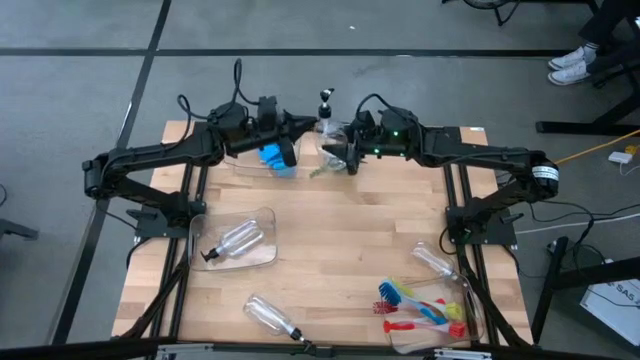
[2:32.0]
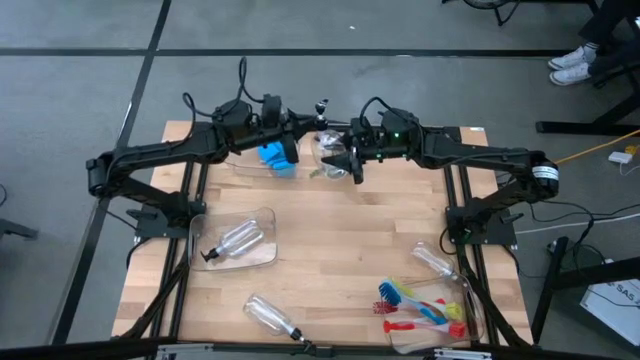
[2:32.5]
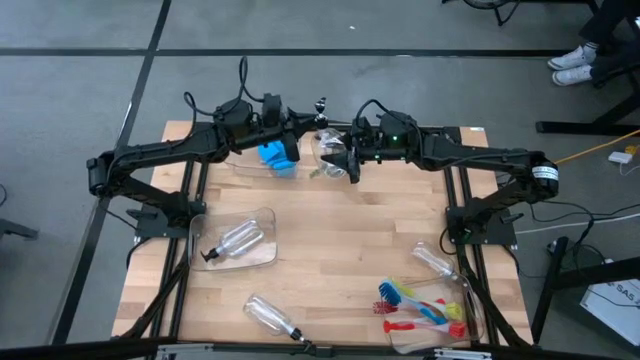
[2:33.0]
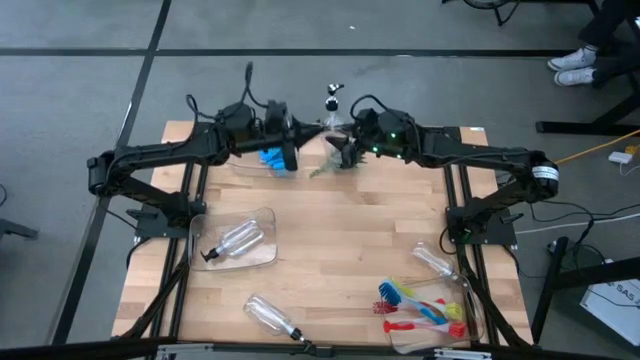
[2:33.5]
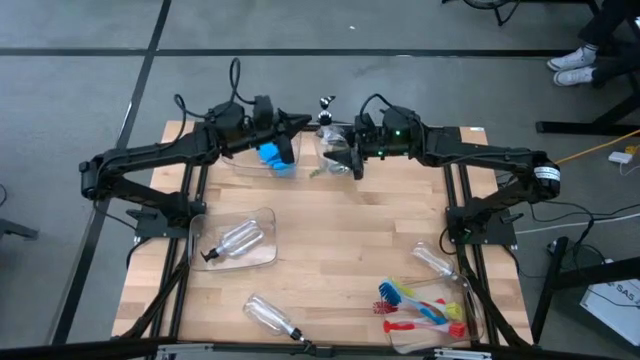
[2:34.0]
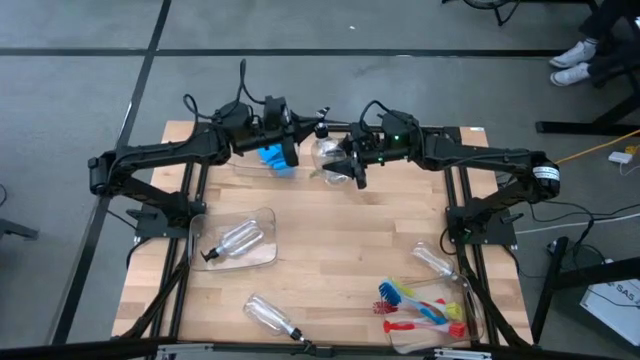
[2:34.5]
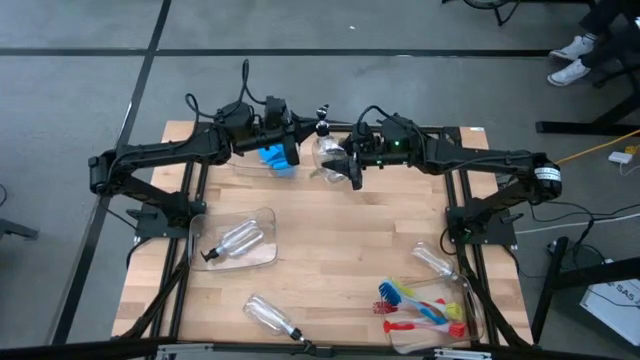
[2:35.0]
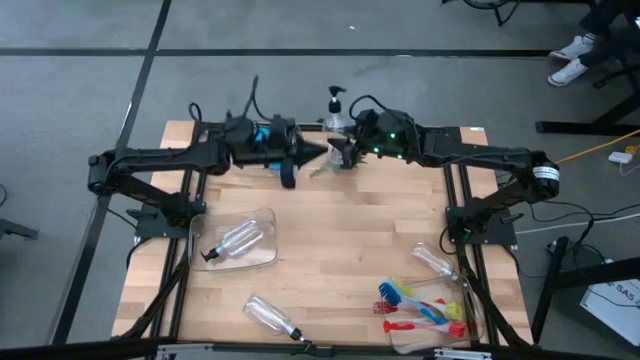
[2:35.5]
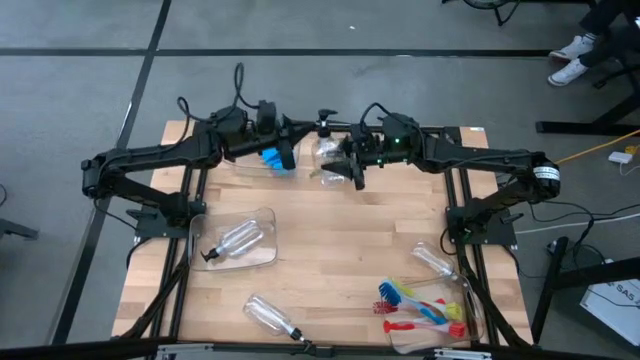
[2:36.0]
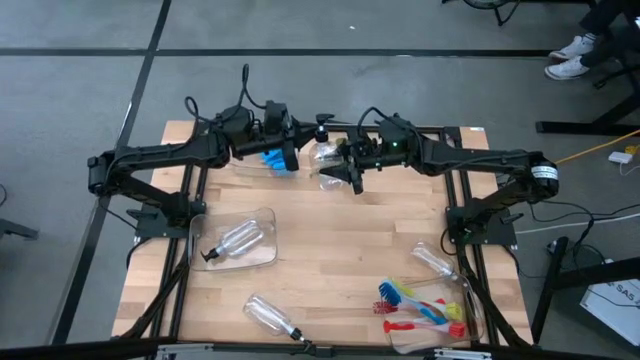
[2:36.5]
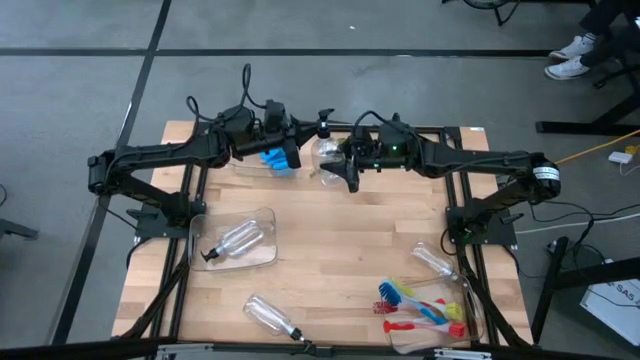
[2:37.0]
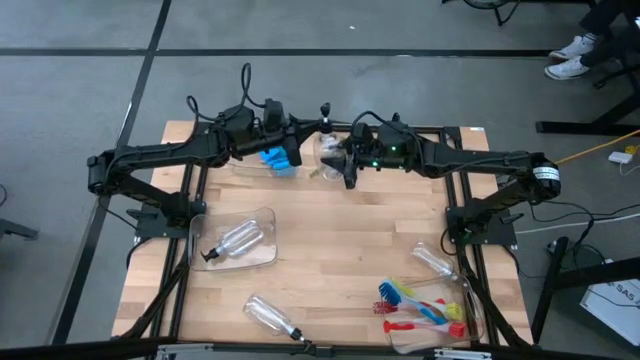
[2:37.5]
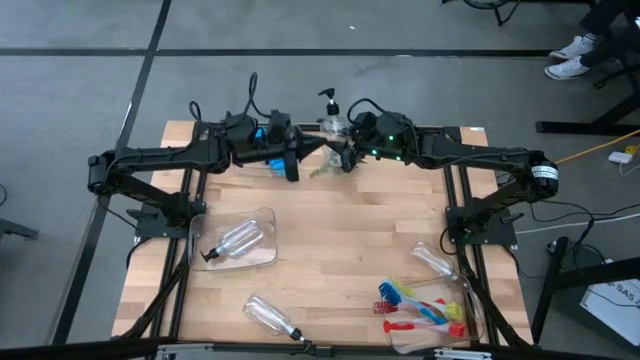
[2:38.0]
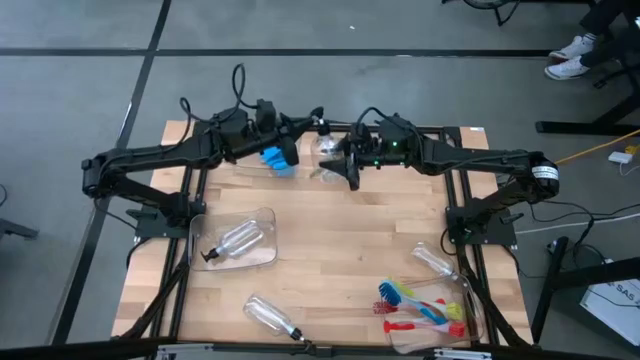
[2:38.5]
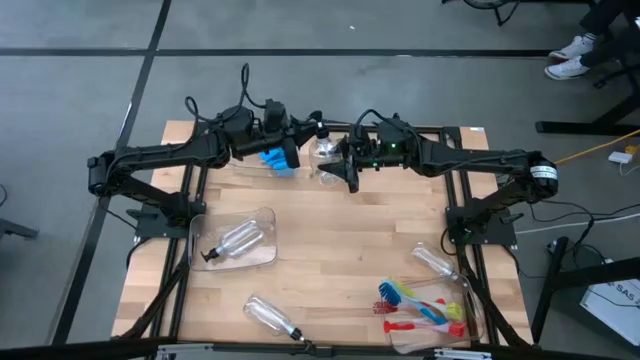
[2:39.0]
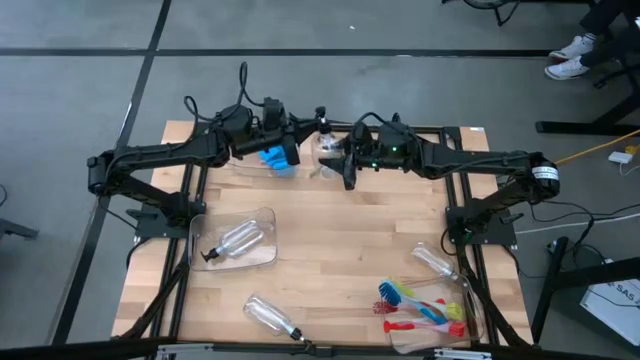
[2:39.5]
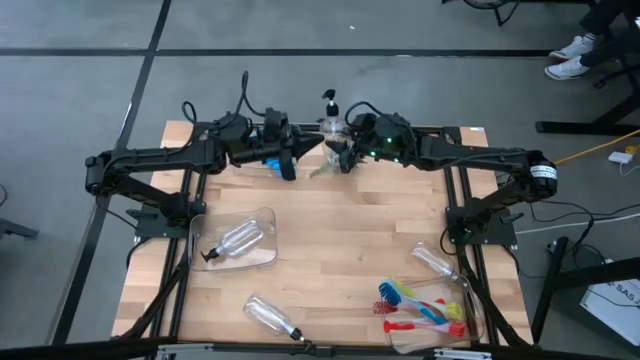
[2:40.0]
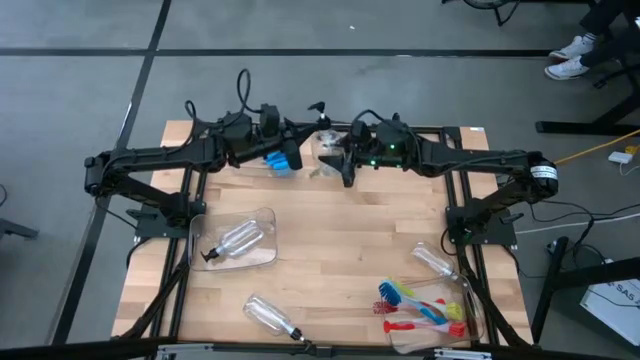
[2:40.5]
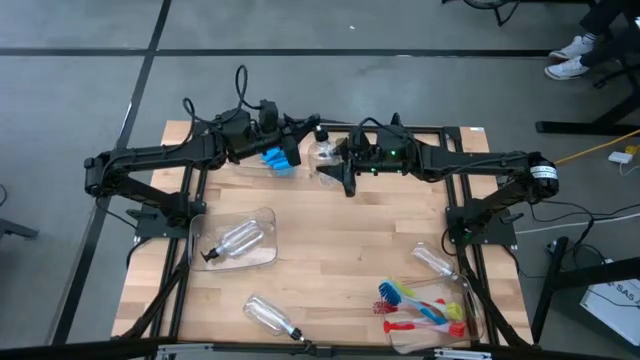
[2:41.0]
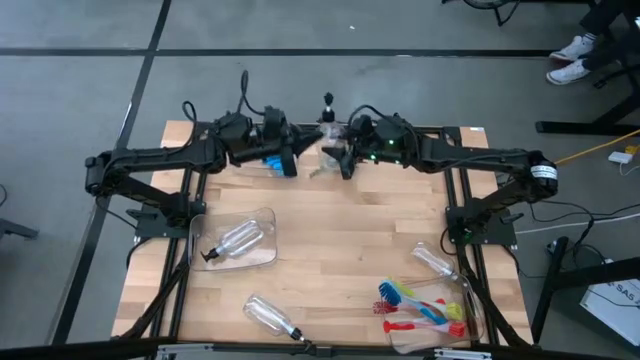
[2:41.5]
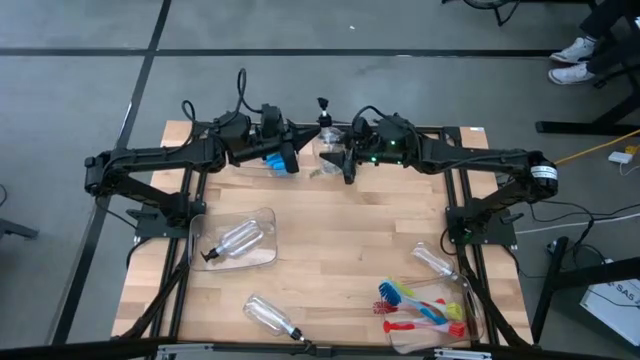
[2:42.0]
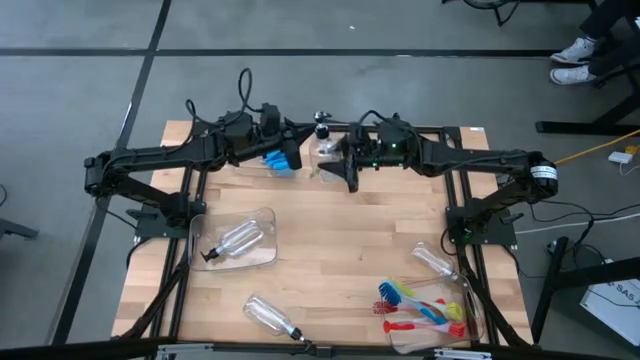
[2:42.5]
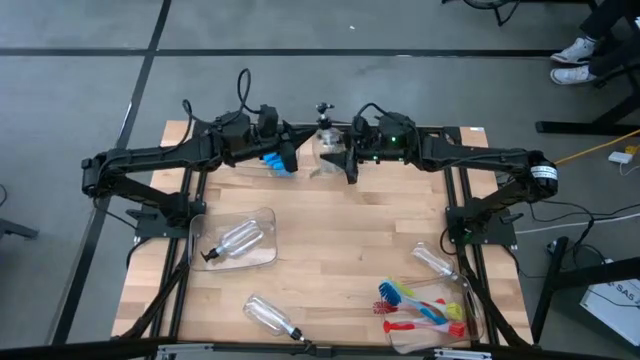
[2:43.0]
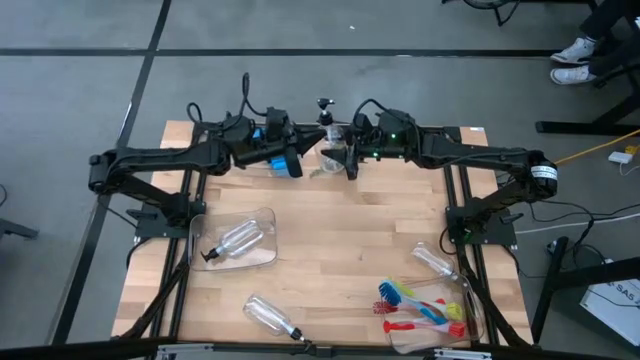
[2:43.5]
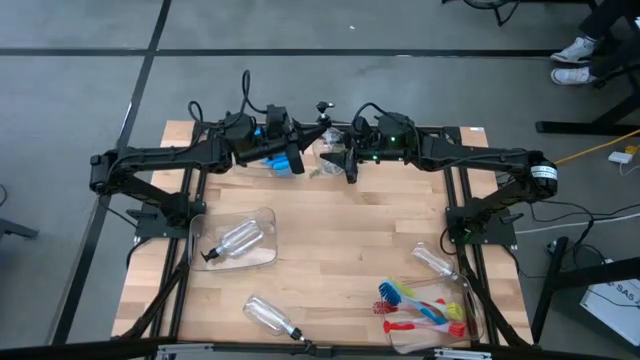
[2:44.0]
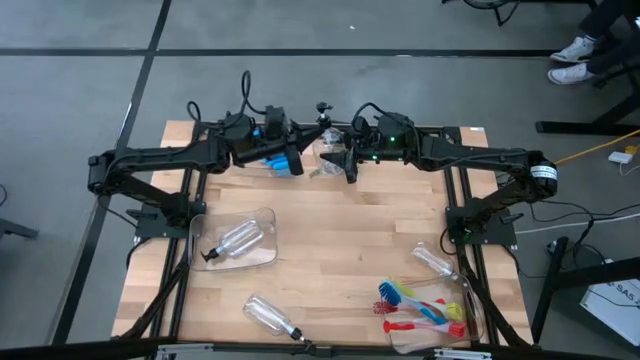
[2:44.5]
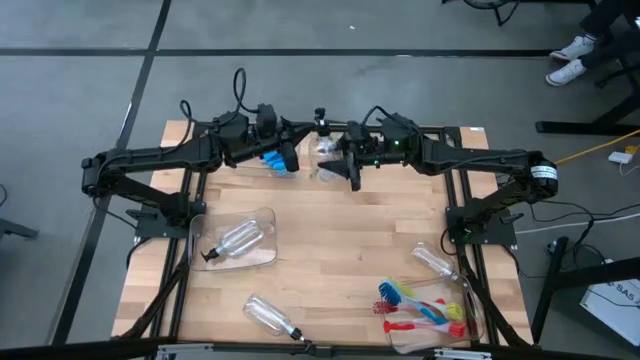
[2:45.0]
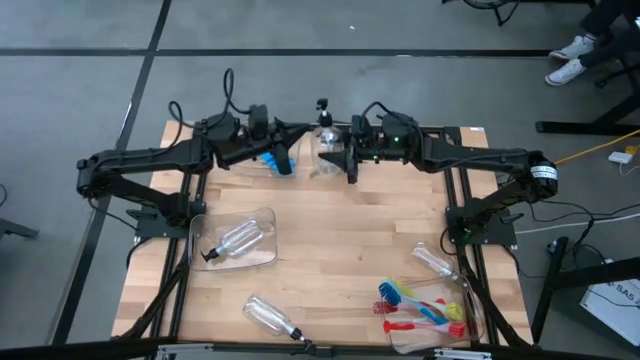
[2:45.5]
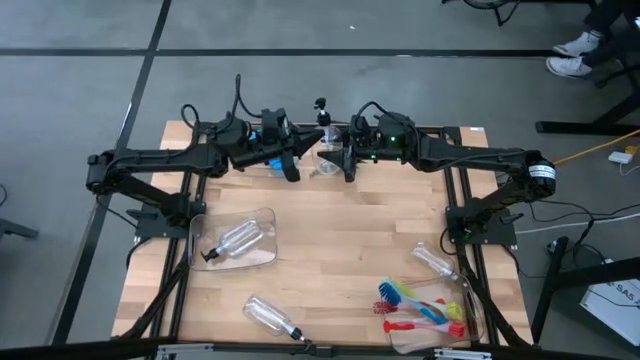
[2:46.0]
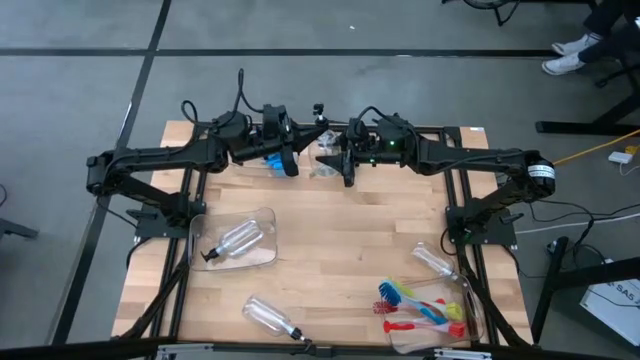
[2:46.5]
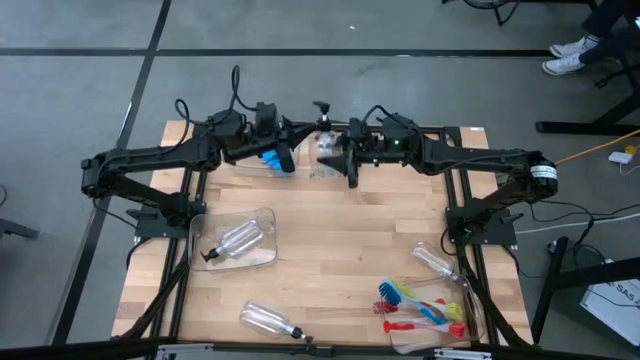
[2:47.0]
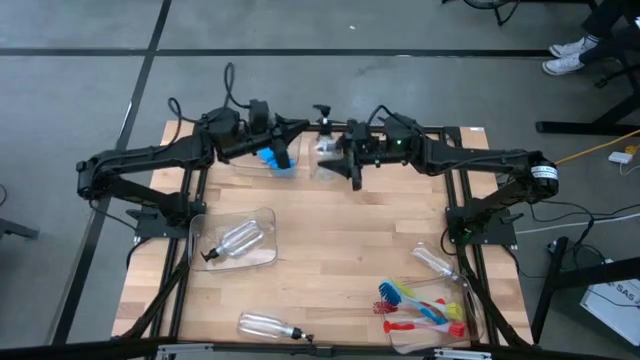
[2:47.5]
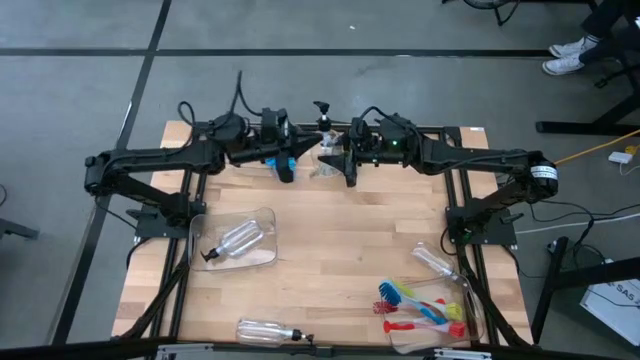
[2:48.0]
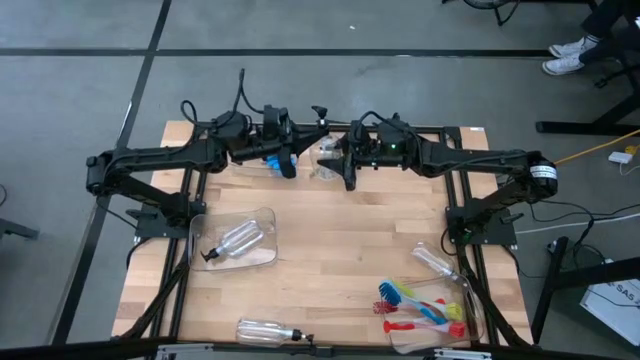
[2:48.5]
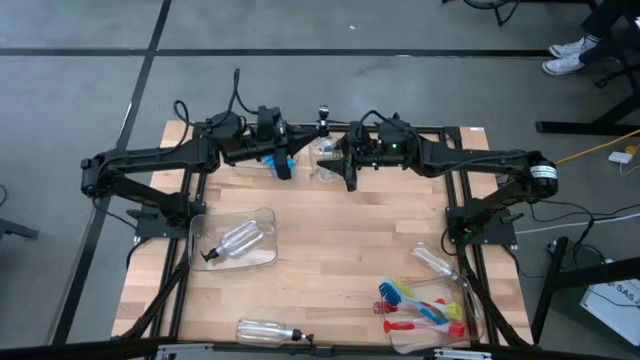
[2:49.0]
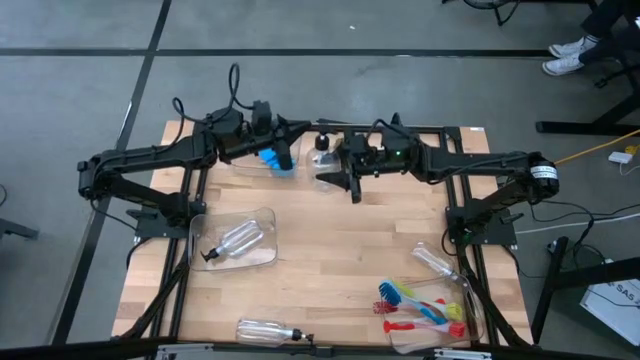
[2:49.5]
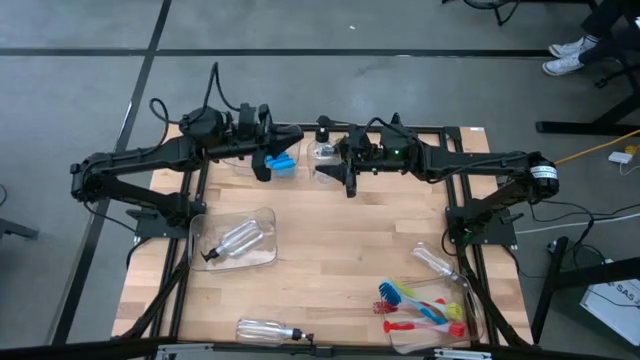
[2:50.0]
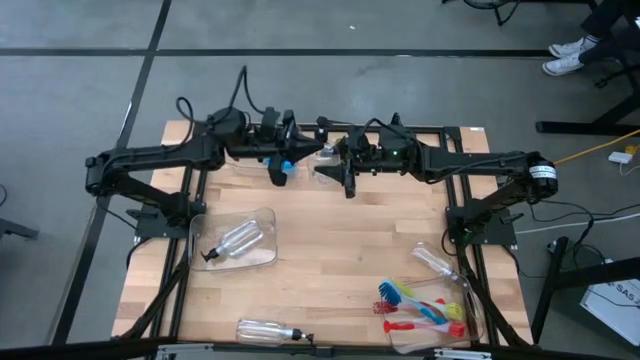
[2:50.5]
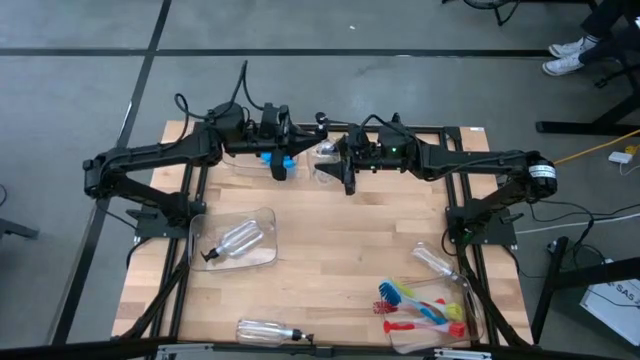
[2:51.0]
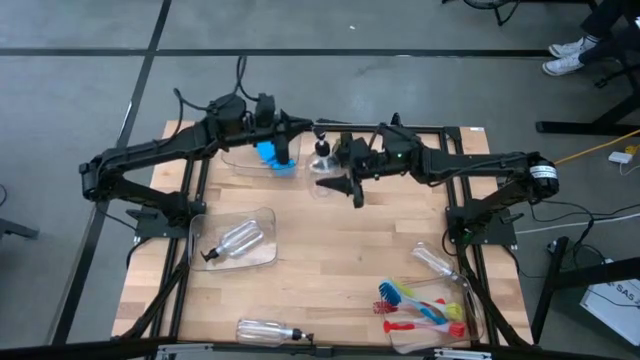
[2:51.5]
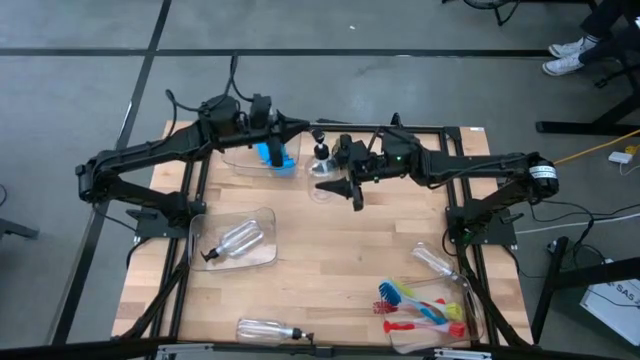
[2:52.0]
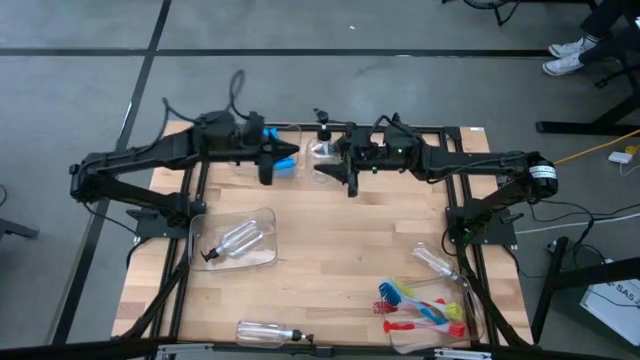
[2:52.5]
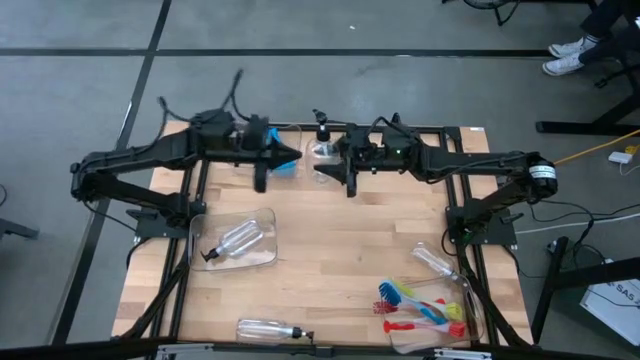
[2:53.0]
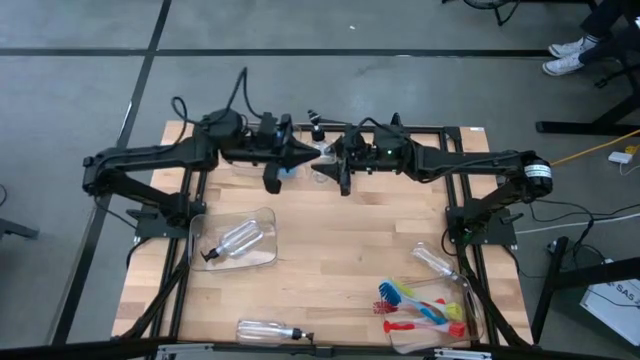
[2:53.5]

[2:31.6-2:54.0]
Task: Pick & Place Kitchen Sink Supplies
Put the transparent soap dispenser into the middle transparent bin
